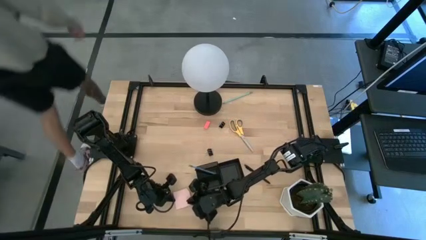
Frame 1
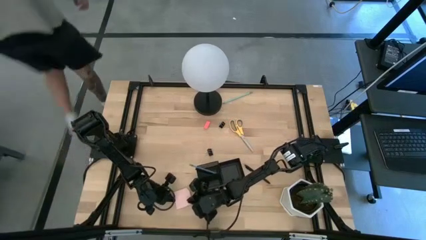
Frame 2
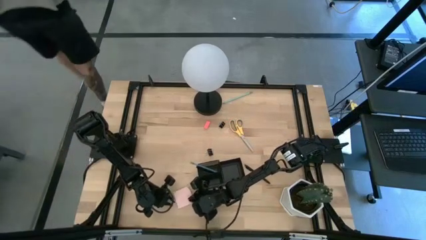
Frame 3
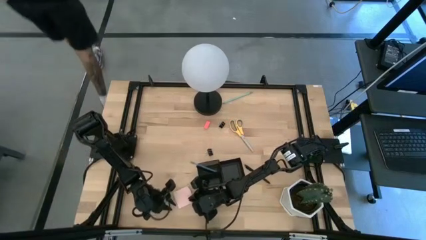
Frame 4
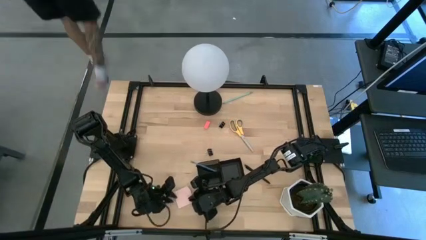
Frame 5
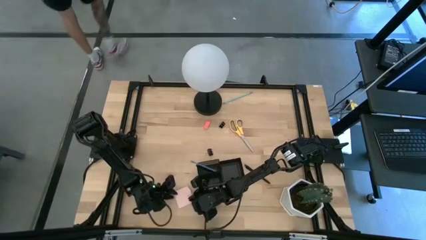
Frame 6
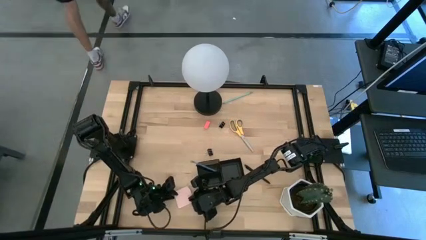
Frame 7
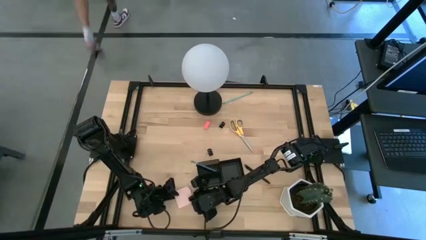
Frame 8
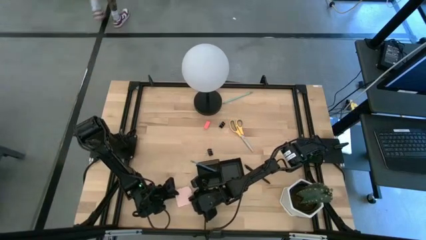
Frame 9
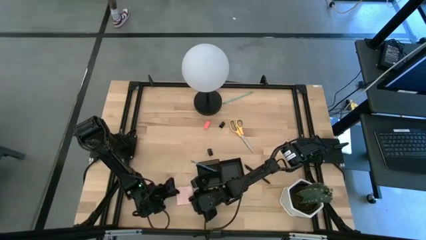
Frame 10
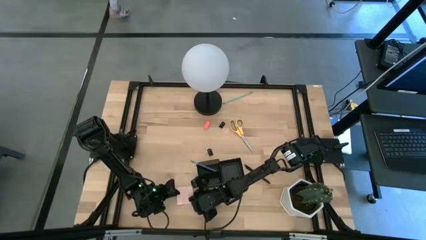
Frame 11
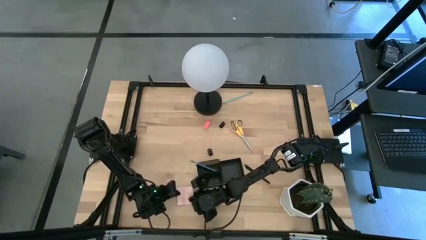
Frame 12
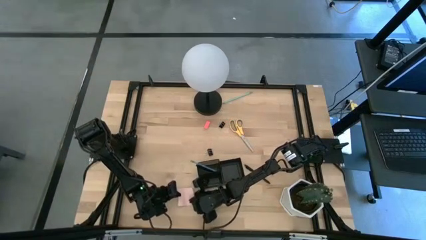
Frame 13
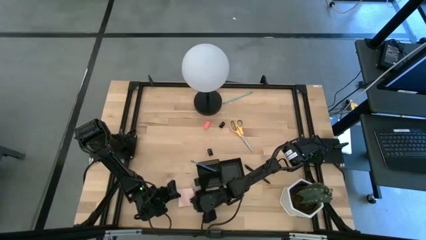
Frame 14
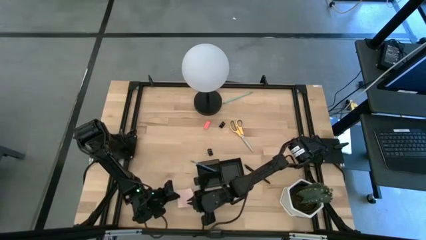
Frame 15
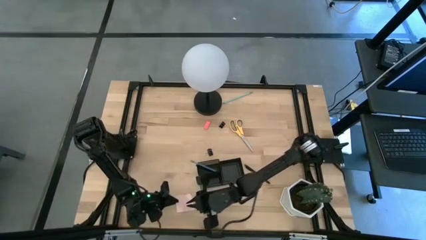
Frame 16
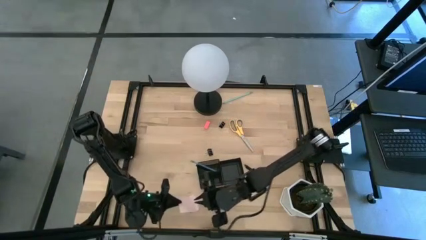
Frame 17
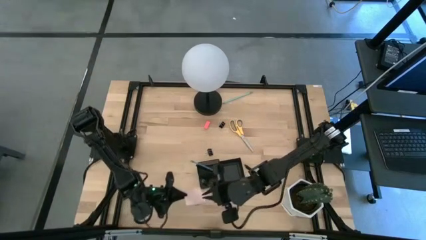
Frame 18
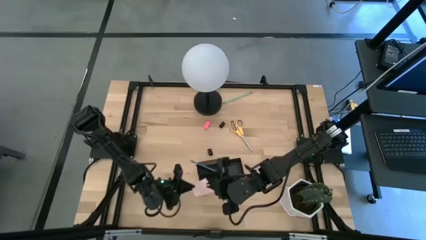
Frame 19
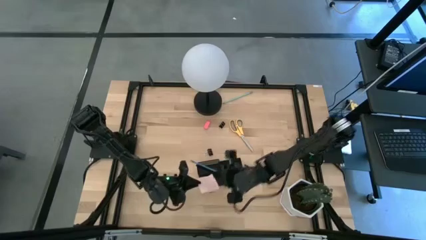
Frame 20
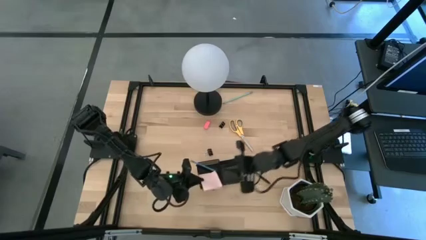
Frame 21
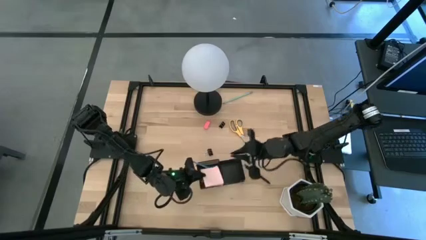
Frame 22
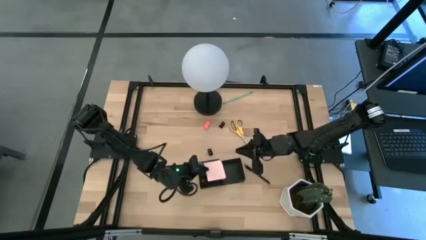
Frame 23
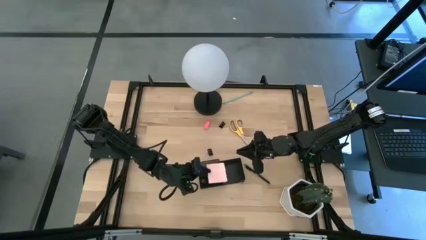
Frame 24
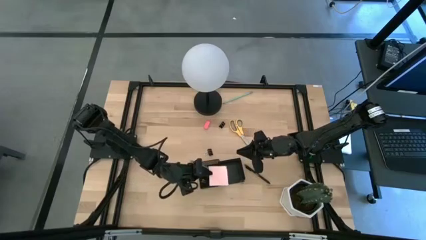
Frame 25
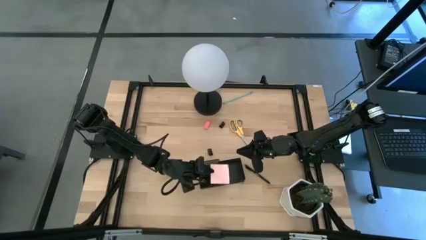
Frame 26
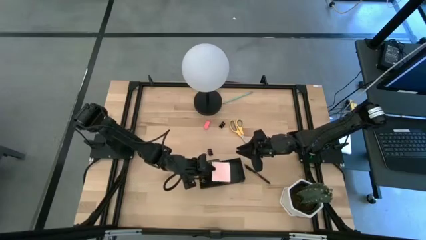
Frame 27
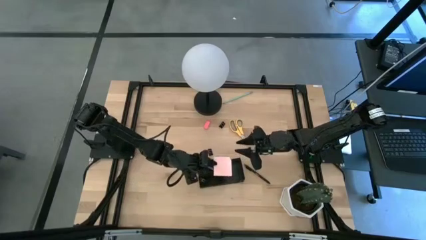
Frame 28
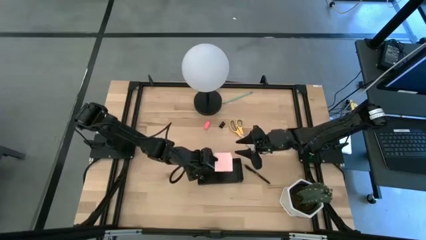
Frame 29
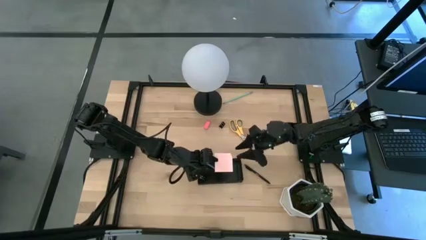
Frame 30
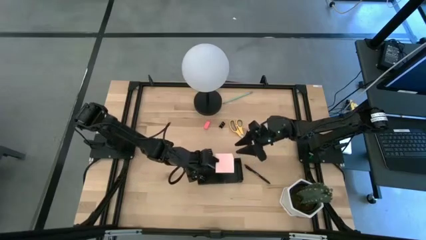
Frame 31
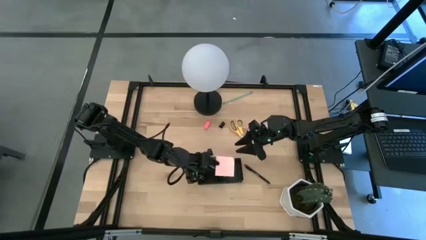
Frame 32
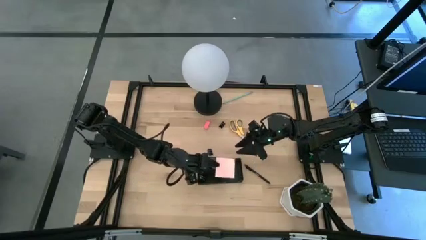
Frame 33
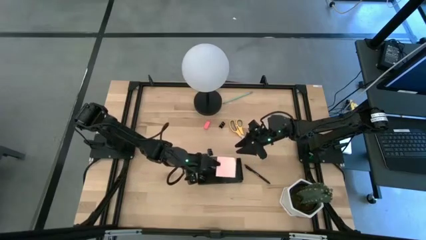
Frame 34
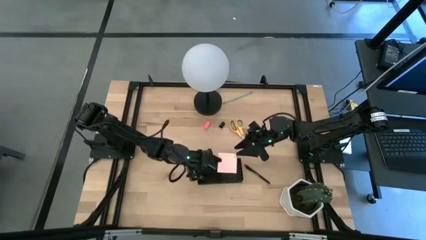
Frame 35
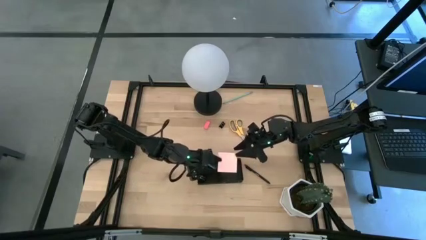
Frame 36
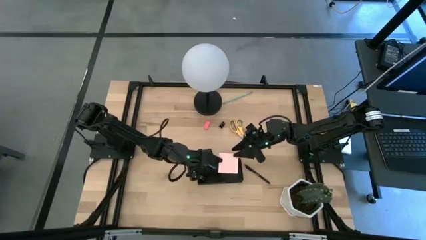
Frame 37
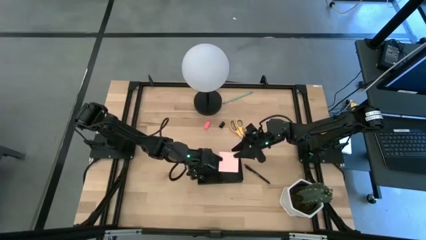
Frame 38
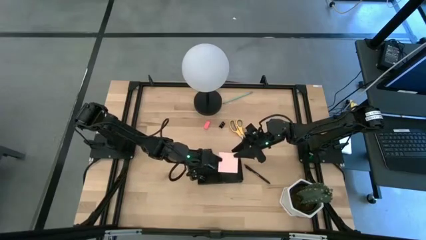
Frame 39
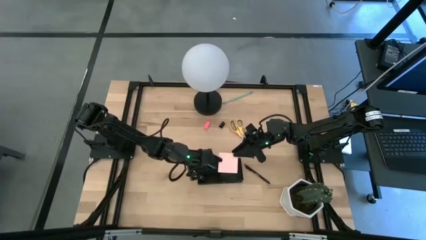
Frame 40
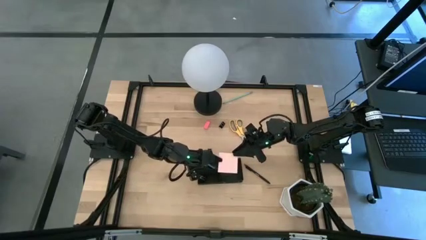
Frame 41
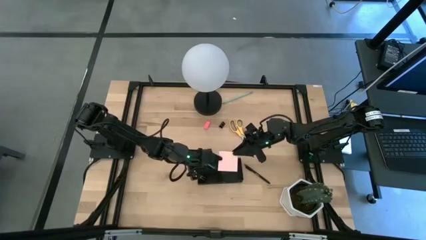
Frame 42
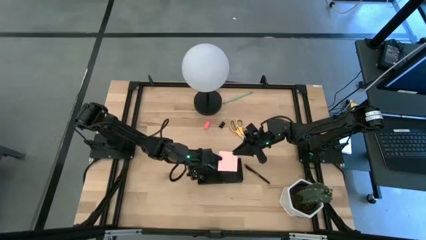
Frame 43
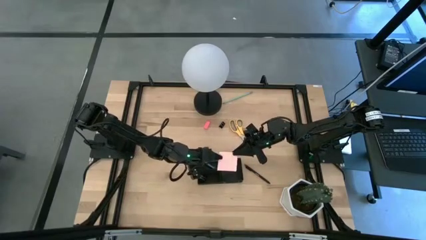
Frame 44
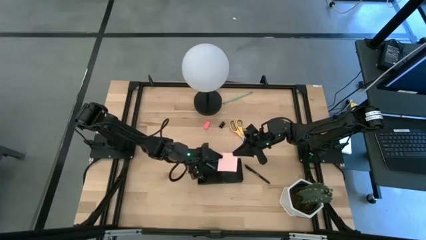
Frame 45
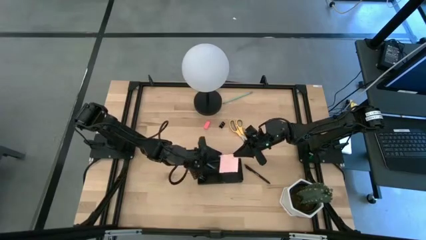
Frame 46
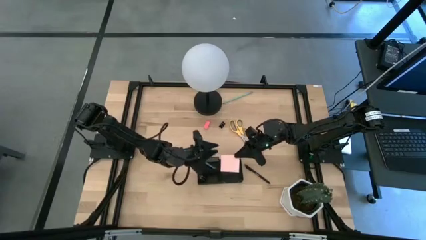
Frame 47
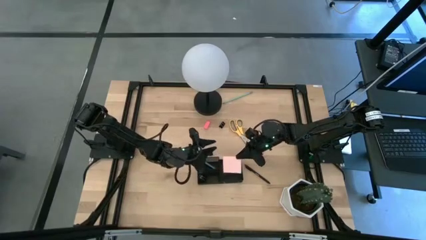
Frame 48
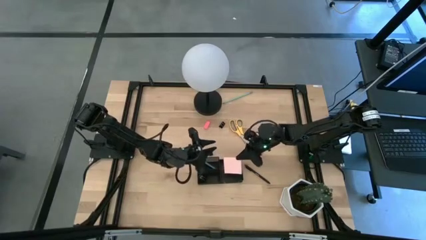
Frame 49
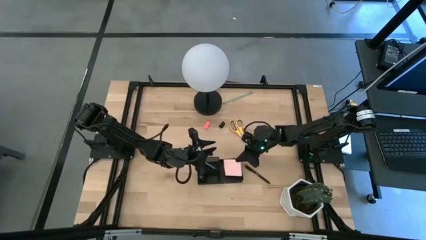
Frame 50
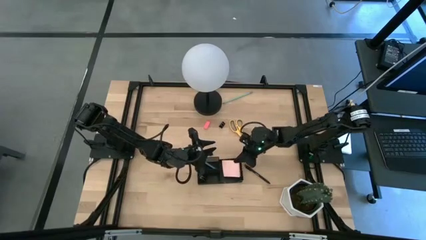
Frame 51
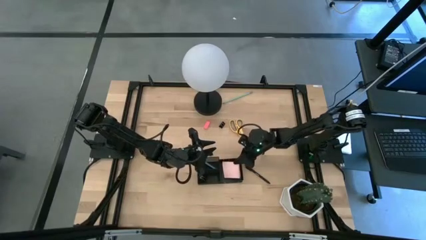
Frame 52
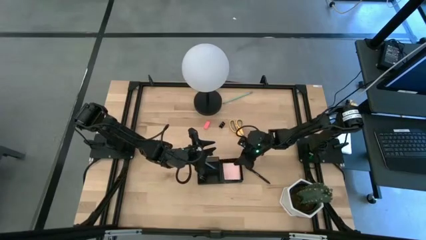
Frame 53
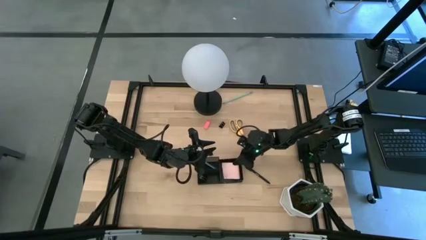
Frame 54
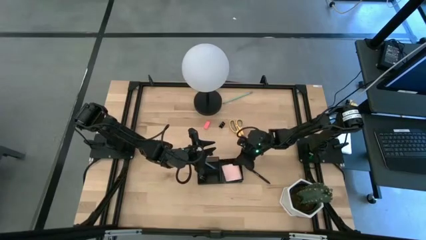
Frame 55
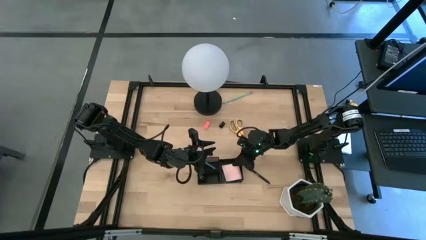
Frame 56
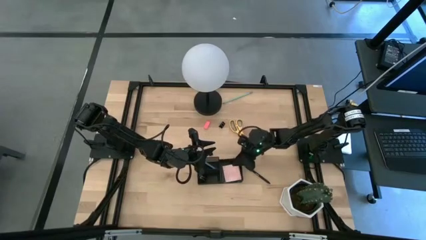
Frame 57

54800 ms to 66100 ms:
Task: Pick and place office supplies into organizer
Put the pink sticky note into the black desk organizer

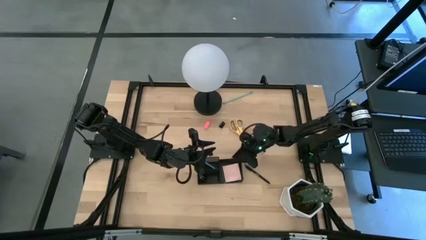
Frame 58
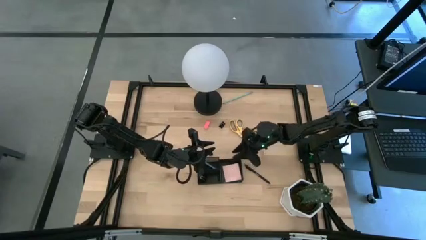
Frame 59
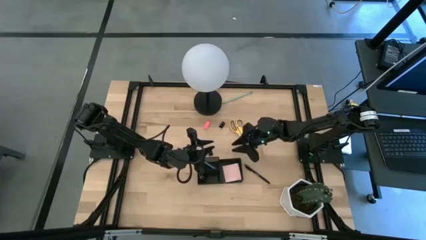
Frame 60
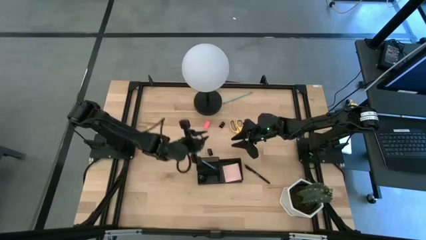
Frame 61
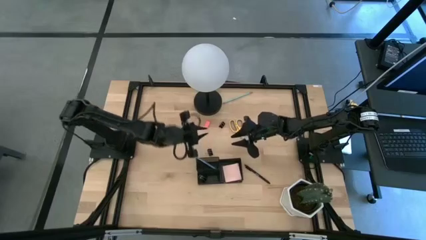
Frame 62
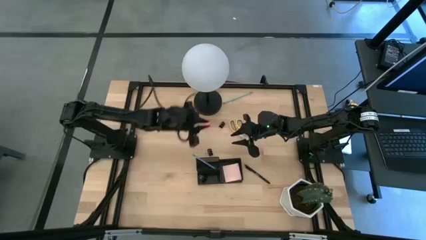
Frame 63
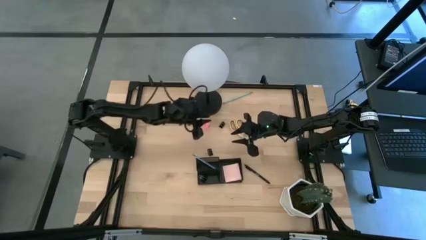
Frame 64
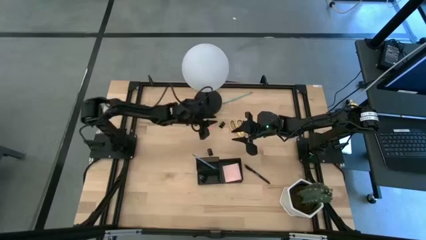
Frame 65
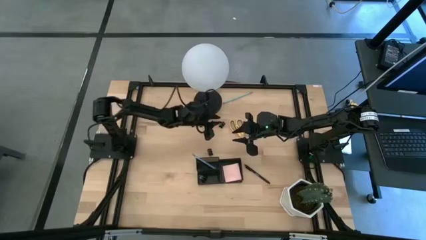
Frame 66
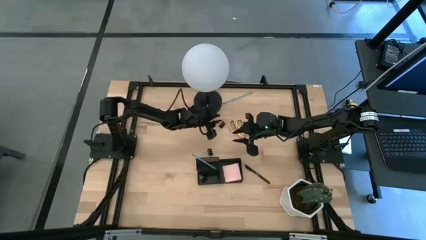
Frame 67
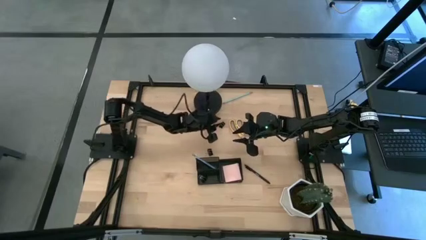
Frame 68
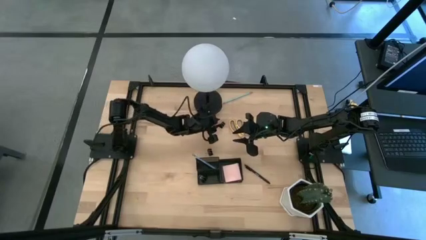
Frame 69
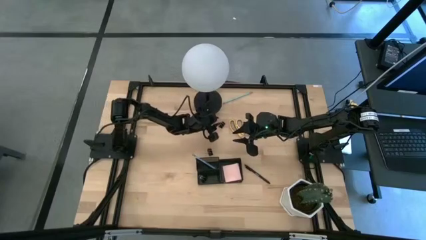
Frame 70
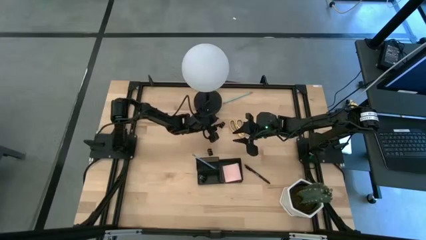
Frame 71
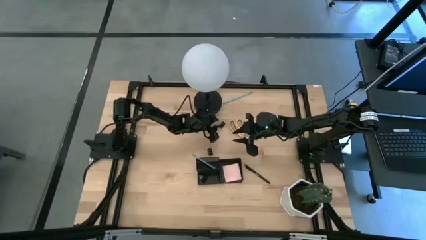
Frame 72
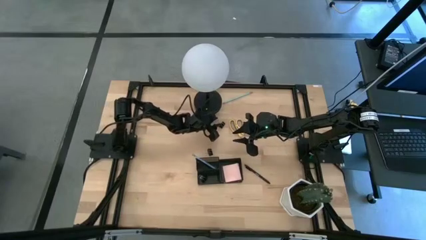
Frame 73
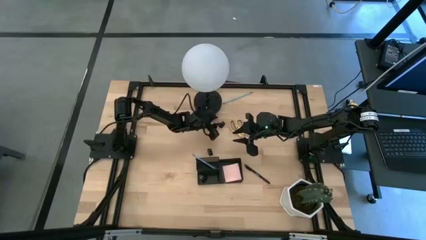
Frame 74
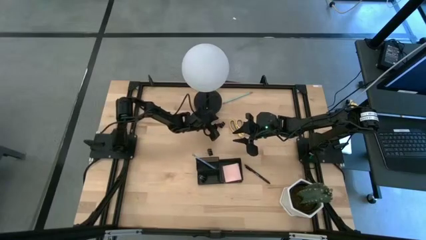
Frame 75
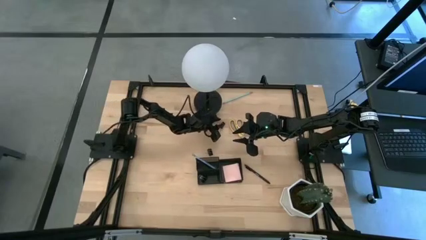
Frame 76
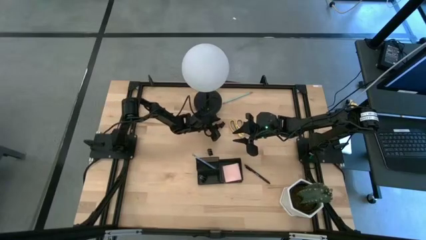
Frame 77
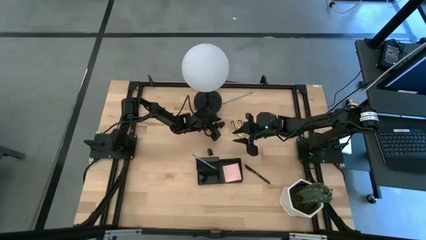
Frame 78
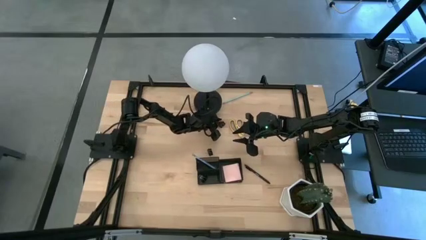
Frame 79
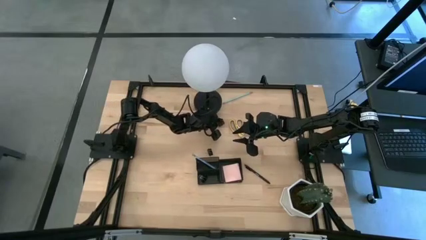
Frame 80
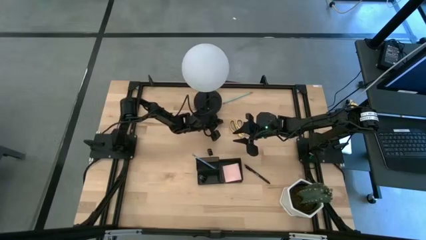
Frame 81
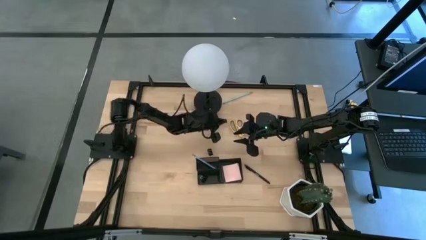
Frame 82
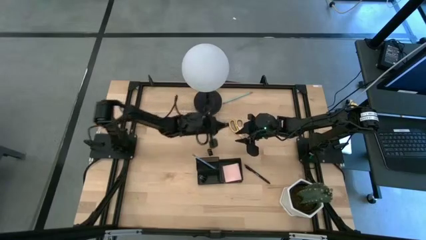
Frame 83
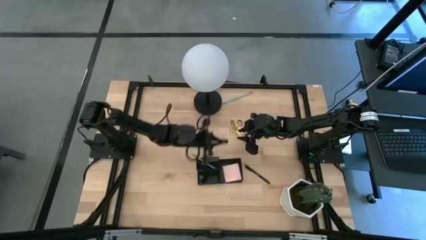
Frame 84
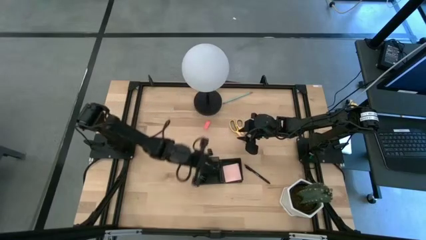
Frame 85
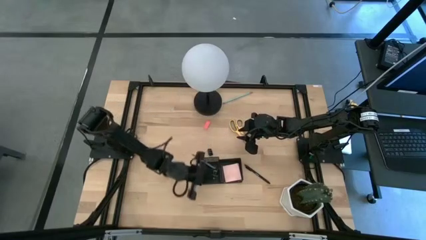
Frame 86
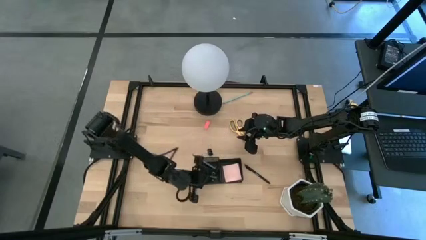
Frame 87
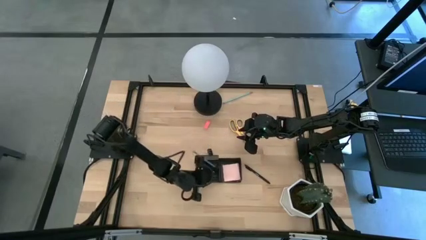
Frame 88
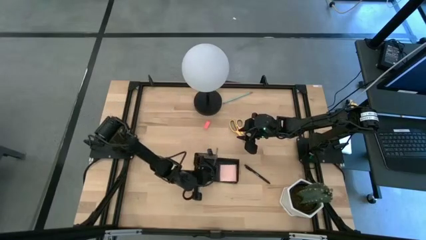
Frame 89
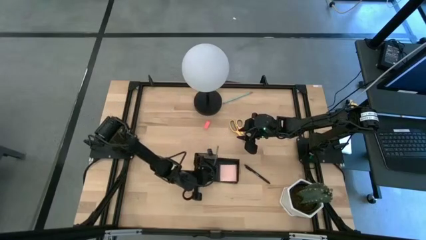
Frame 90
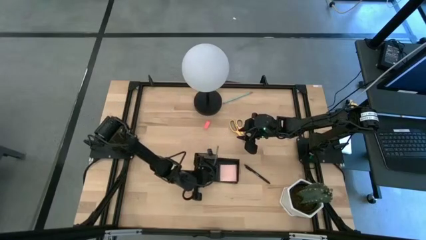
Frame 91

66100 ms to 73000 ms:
Put the top black binder clip into the black desk organizer
